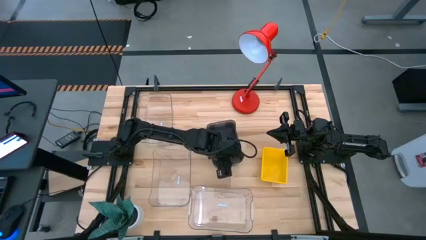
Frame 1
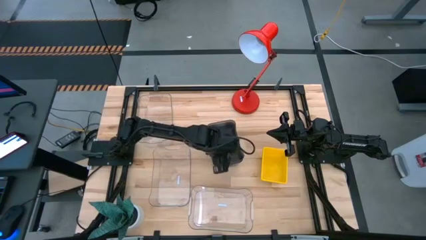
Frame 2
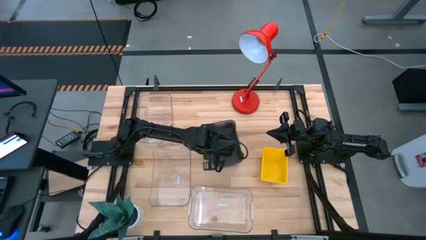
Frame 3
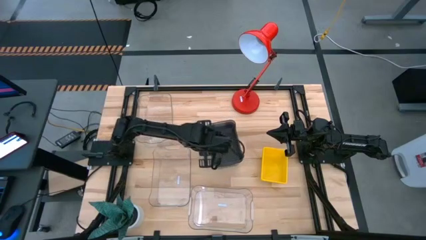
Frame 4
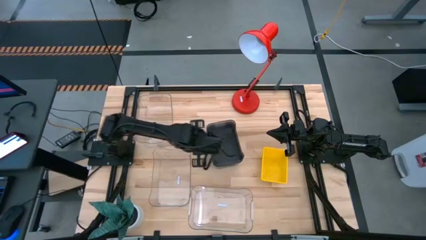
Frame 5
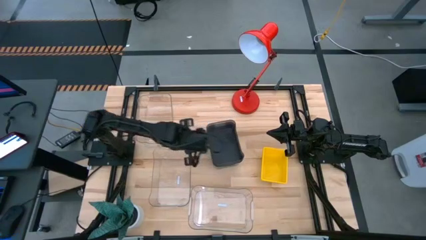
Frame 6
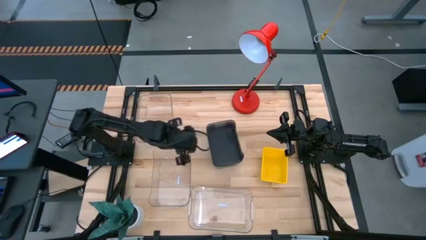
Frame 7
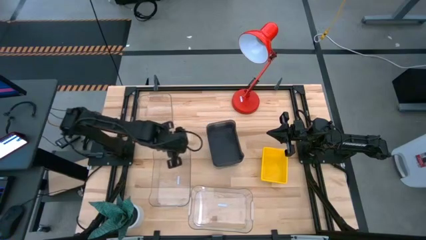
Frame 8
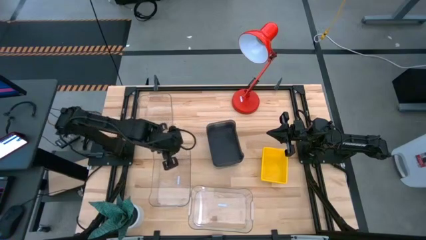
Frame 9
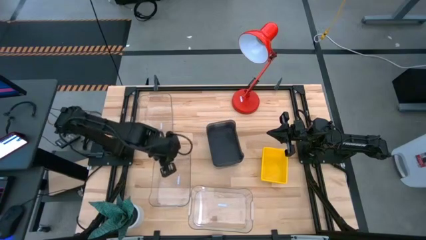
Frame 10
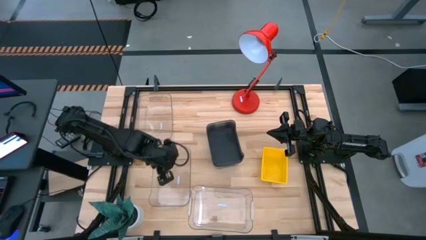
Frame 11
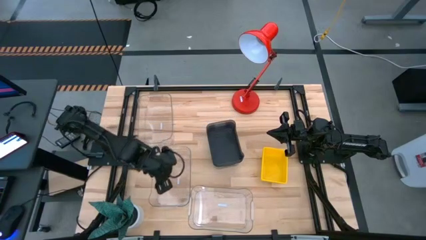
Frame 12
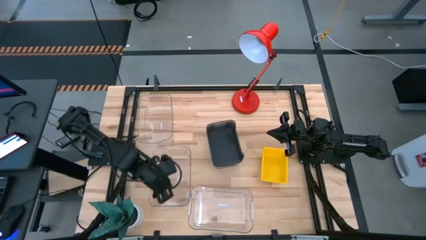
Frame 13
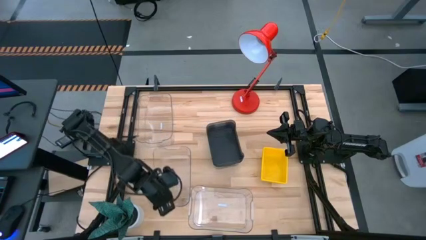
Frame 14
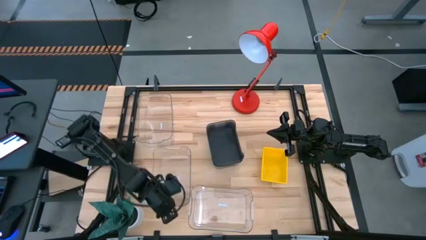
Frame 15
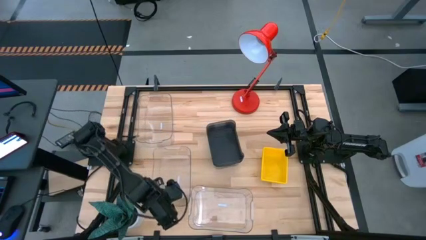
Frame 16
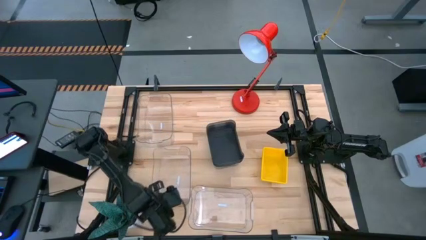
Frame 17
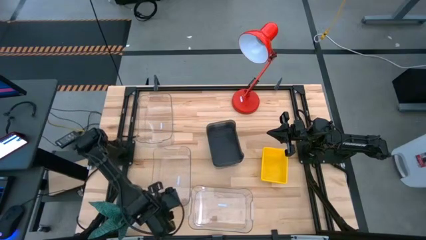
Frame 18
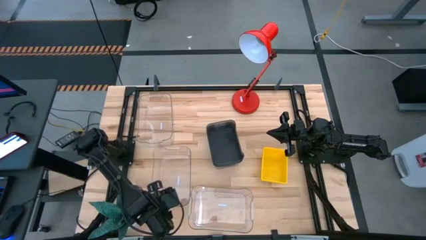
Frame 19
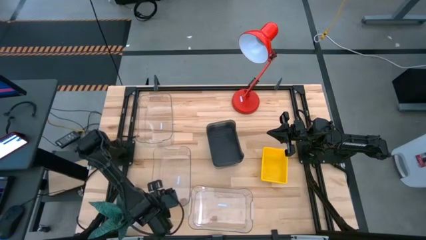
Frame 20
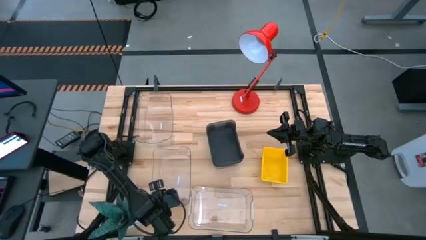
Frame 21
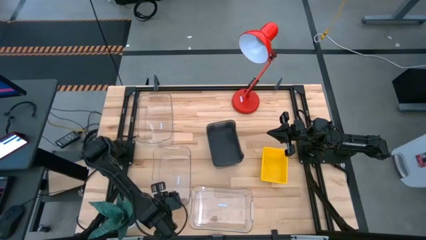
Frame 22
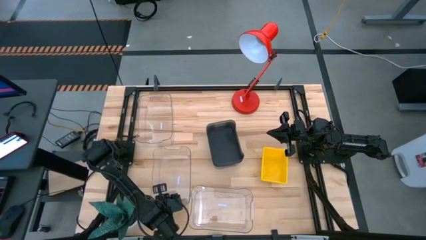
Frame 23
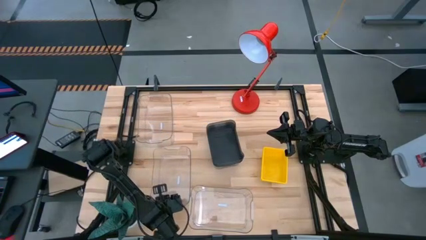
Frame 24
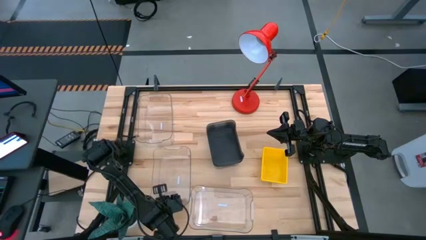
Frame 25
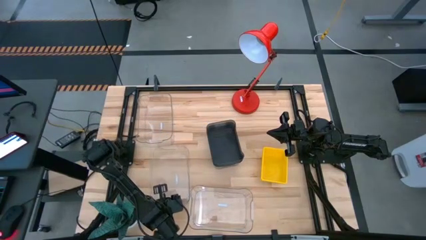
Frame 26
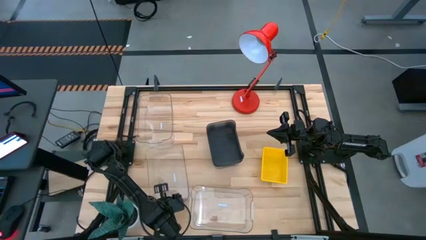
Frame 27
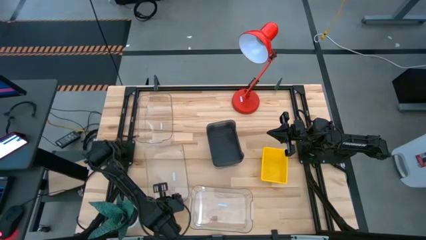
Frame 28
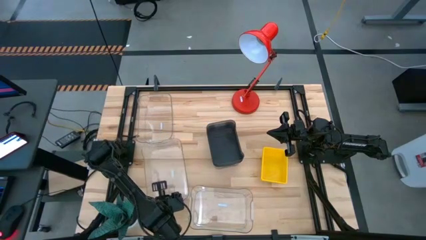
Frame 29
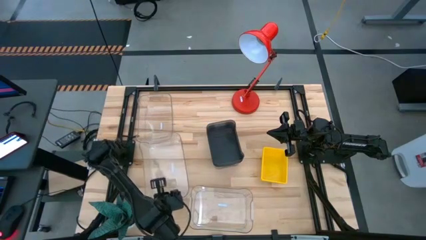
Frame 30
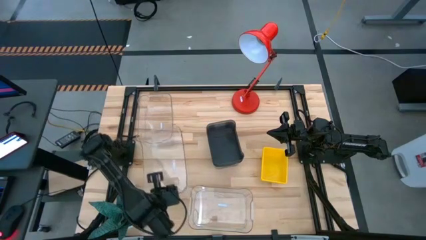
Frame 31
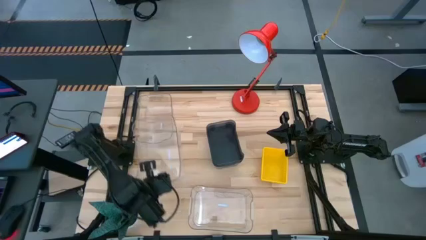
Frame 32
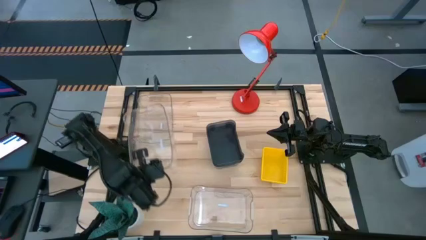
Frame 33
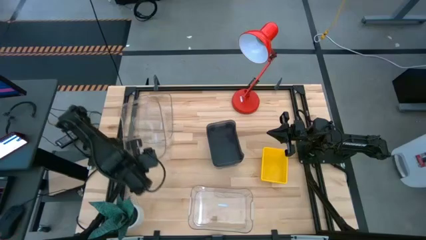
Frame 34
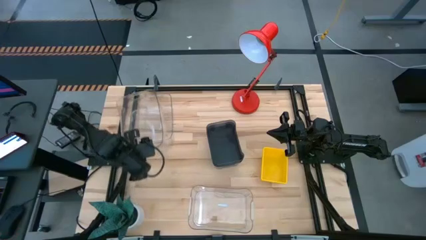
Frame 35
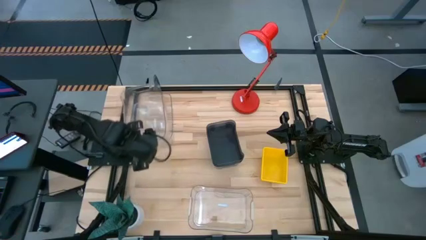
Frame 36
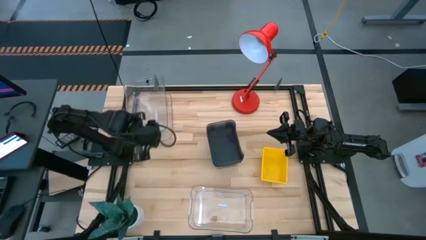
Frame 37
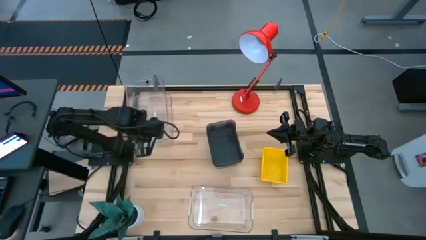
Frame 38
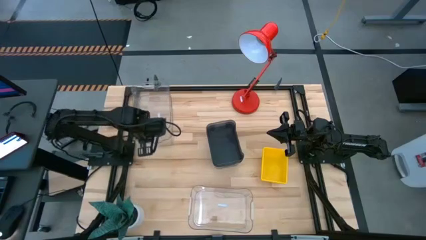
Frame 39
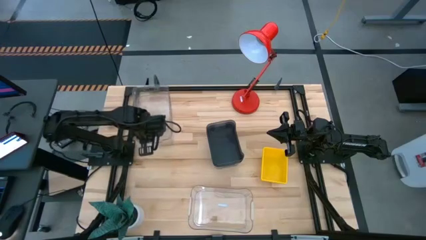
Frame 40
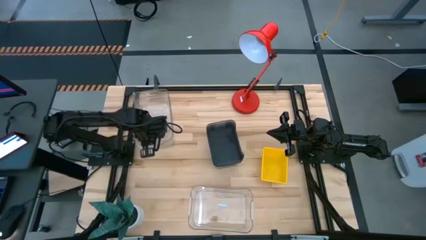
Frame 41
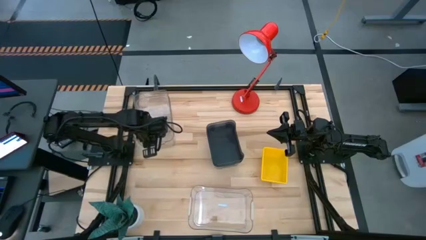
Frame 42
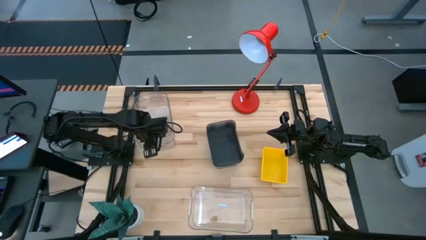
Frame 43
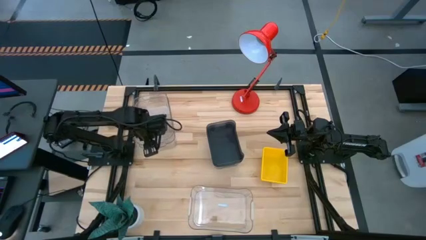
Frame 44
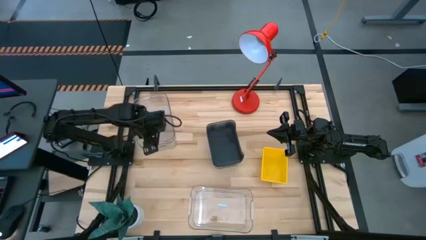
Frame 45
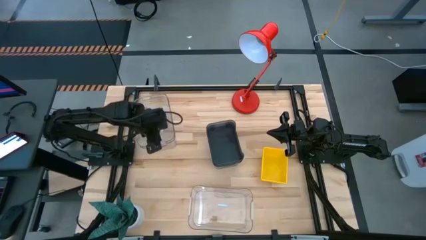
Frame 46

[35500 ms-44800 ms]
Stack the middle transparent bin on the top transparent bin
